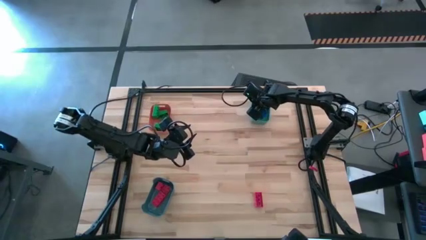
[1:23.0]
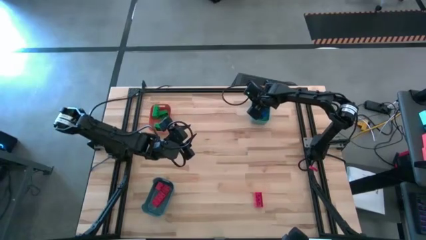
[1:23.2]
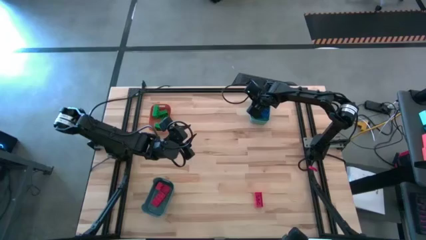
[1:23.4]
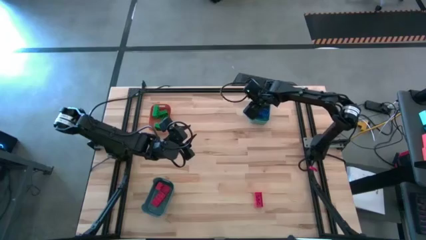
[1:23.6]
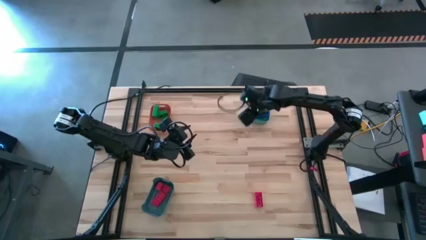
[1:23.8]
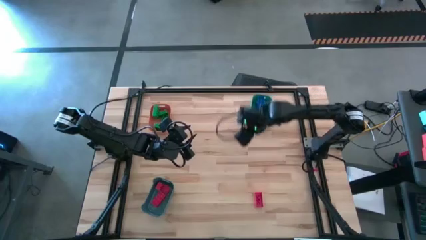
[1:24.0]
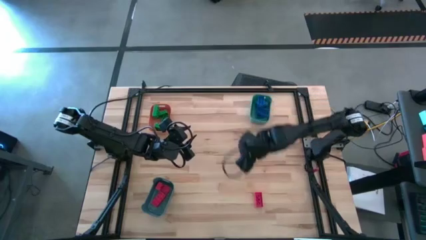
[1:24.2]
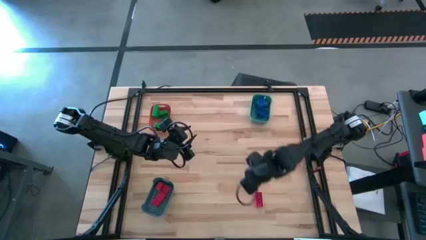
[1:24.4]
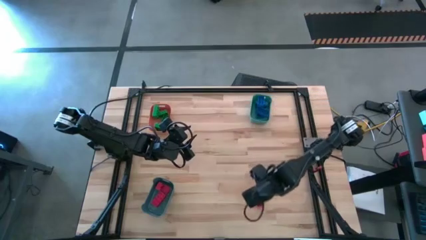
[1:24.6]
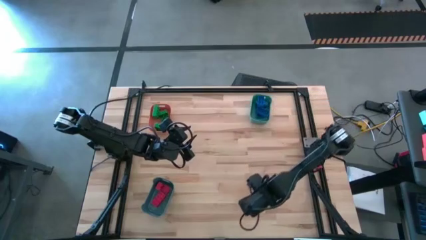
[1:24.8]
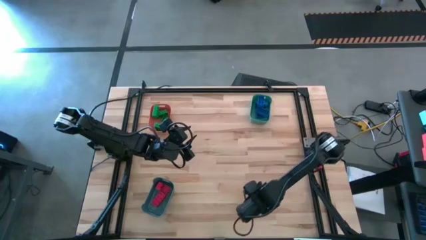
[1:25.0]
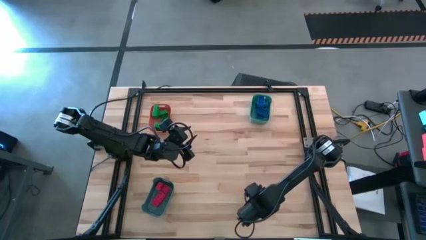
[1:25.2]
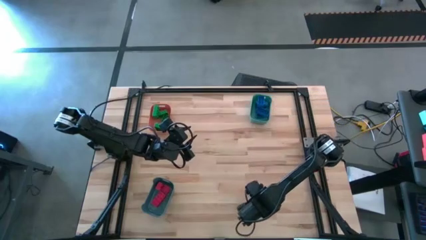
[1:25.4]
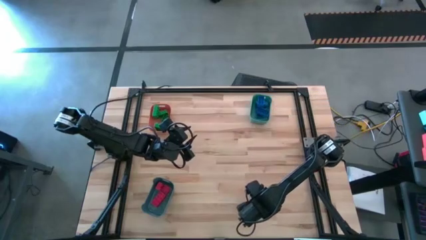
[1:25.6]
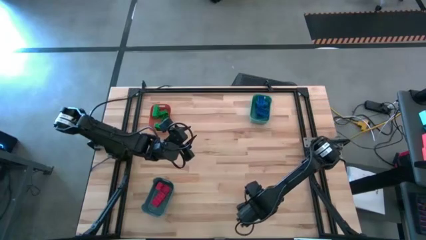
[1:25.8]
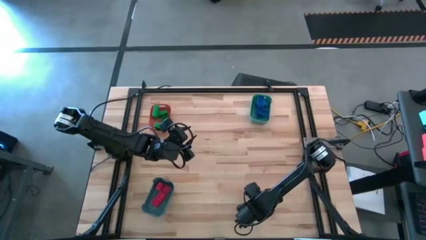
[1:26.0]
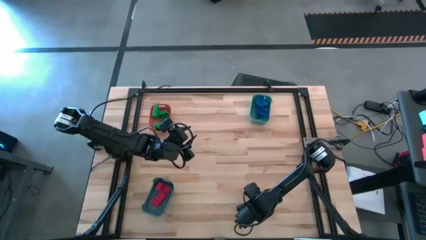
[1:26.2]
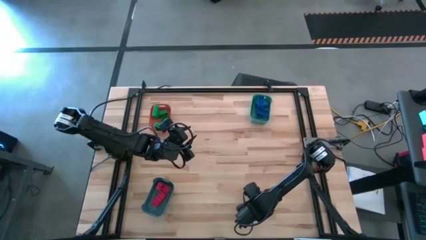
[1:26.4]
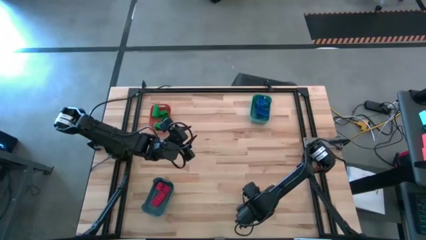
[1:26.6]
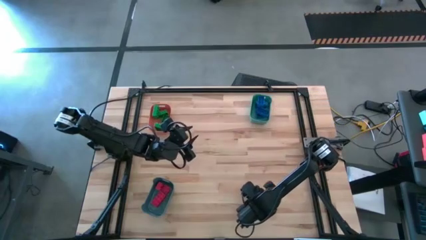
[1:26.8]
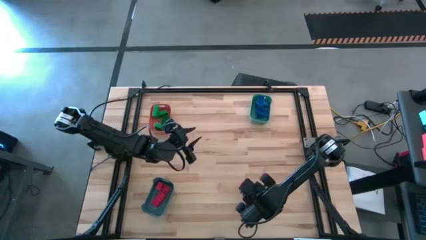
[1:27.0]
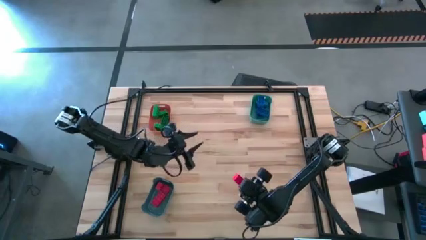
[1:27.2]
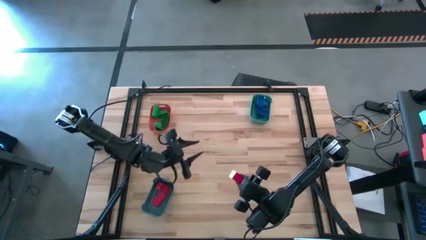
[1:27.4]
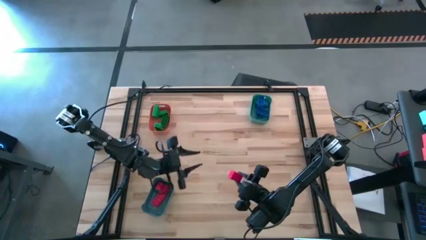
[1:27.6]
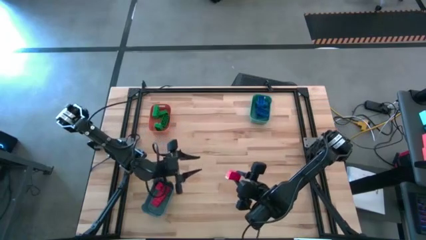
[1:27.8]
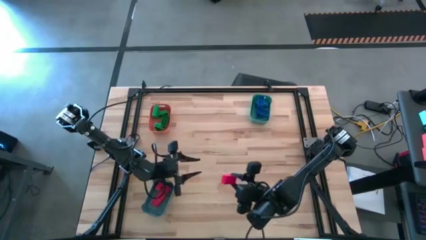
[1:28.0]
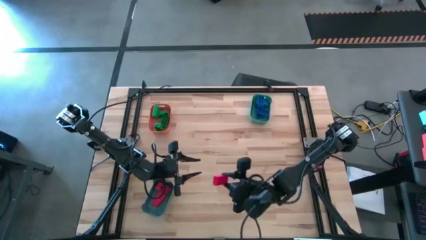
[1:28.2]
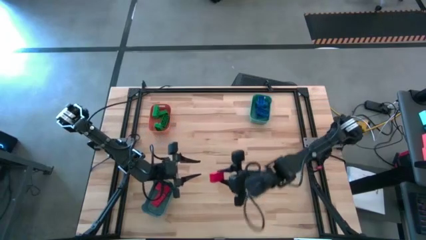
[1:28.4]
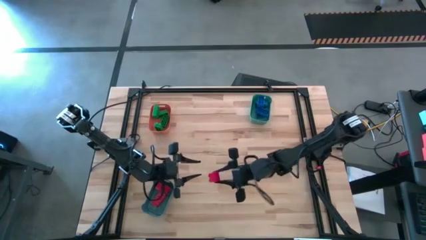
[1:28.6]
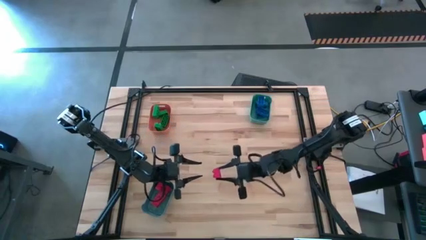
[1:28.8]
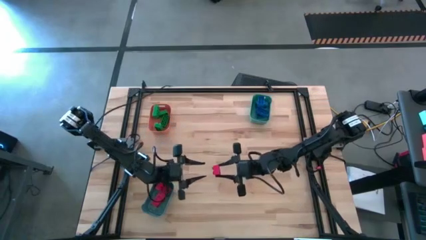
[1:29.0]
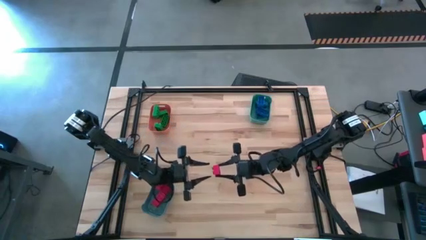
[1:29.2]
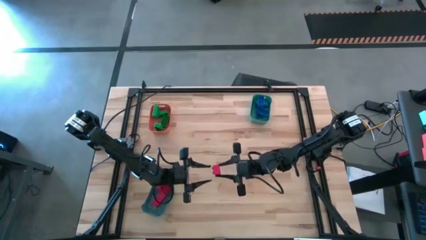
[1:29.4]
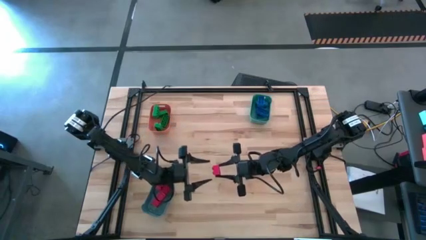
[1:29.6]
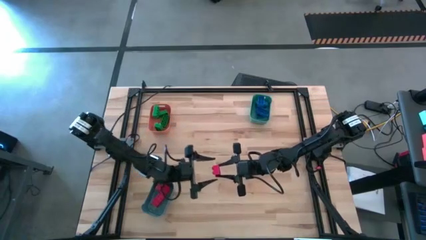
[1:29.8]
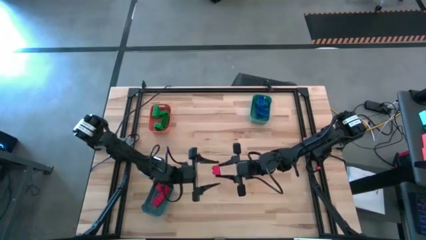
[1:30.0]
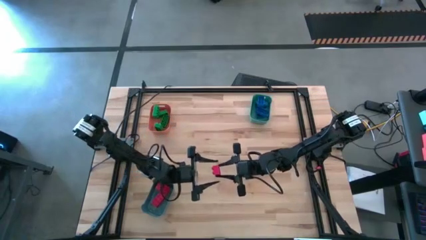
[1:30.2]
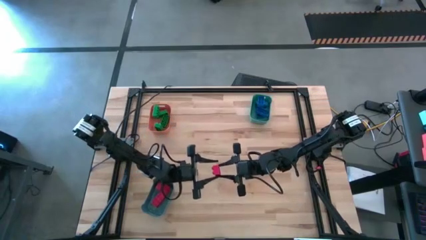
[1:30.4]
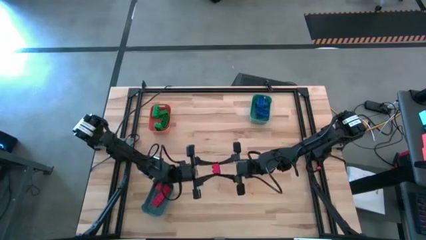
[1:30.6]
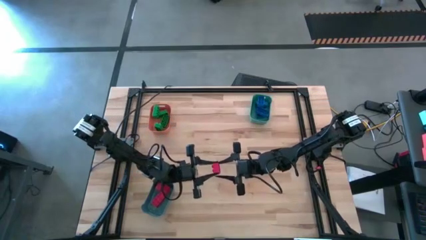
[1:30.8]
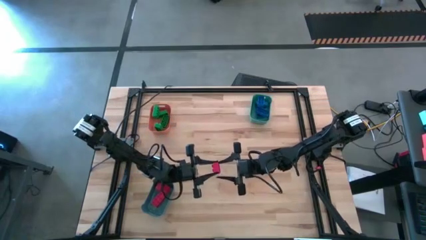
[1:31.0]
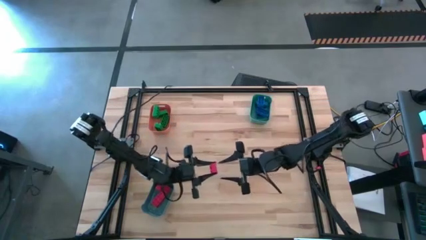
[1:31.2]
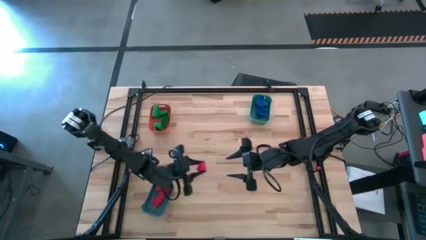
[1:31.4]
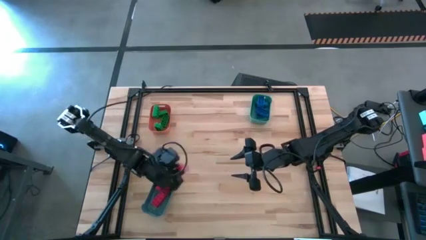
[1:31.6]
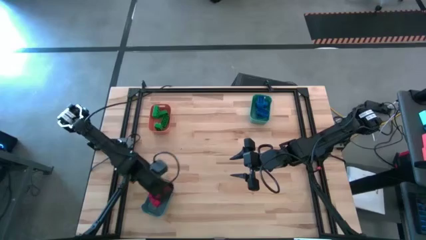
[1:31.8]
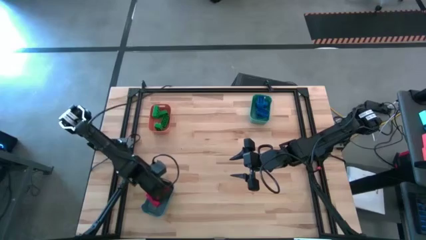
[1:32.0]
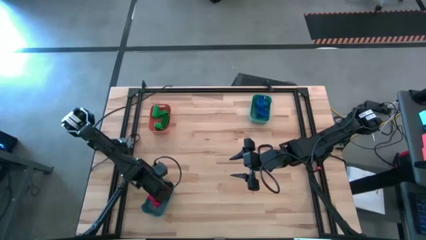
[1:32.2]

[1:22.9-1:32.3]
Task: Sort & place blocks by color
Put the red game piece into the blue bin

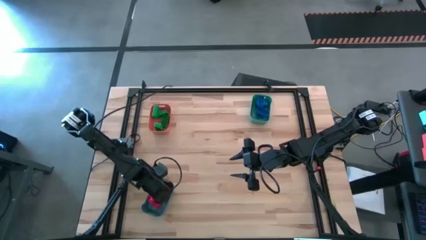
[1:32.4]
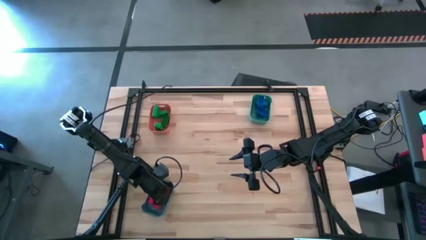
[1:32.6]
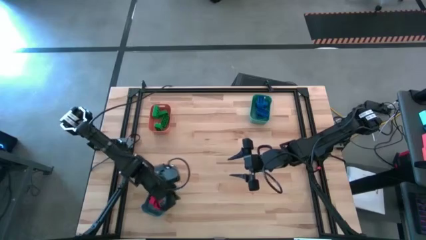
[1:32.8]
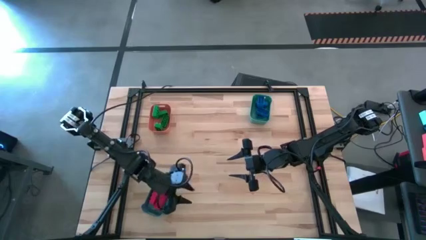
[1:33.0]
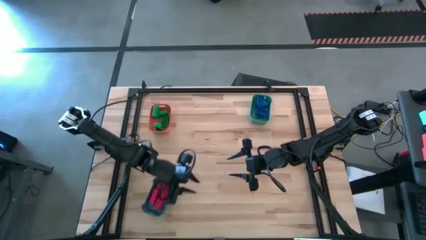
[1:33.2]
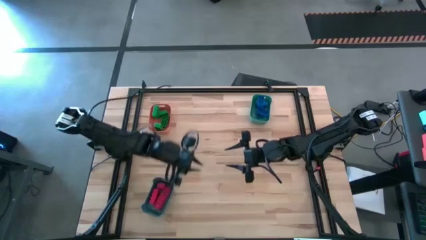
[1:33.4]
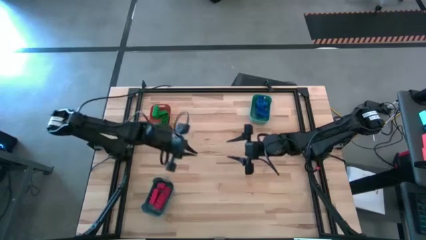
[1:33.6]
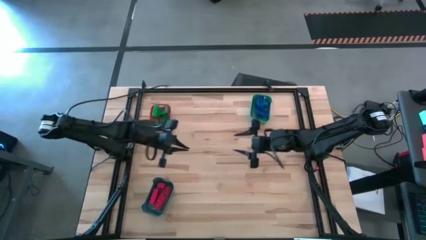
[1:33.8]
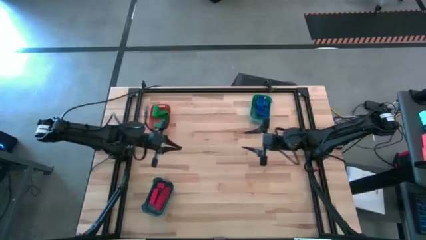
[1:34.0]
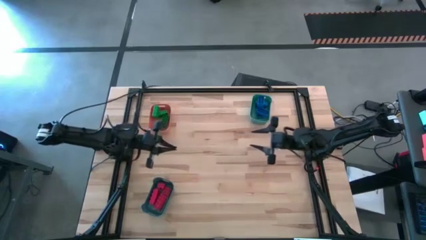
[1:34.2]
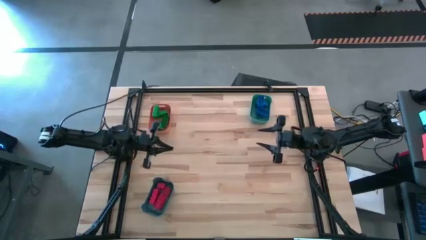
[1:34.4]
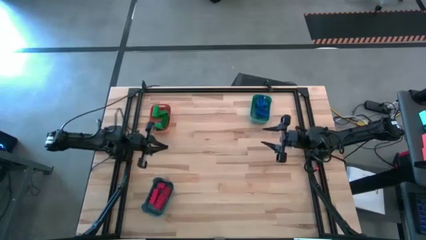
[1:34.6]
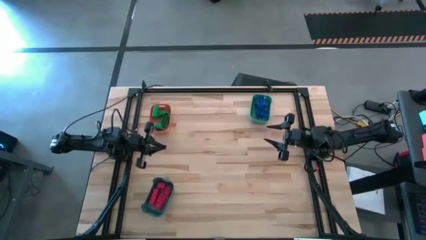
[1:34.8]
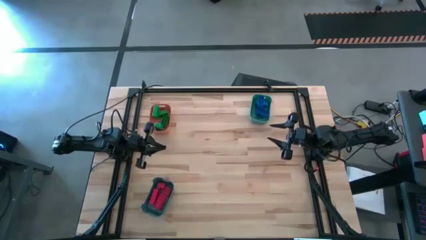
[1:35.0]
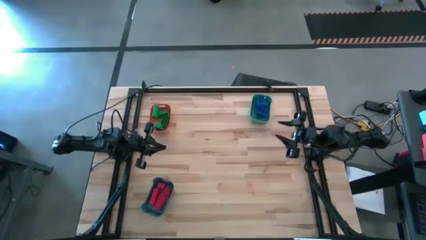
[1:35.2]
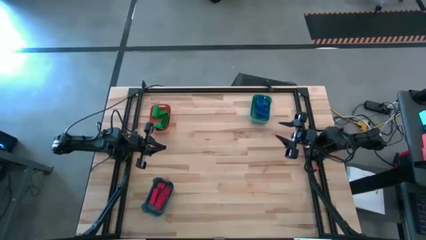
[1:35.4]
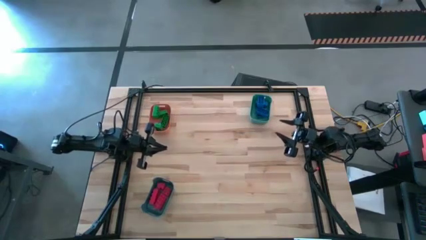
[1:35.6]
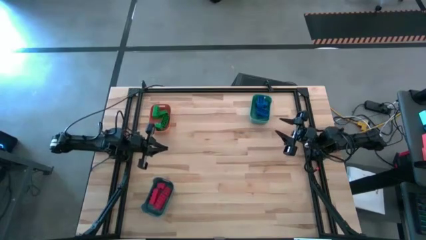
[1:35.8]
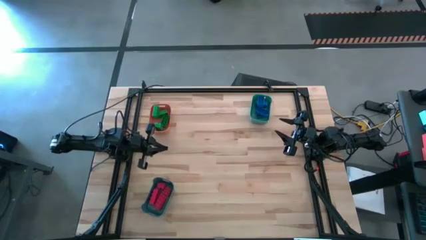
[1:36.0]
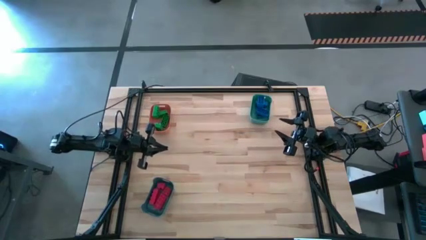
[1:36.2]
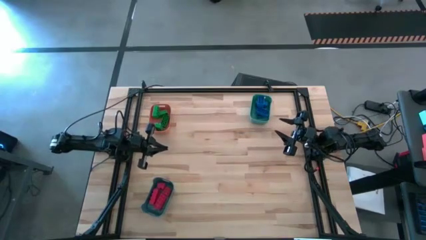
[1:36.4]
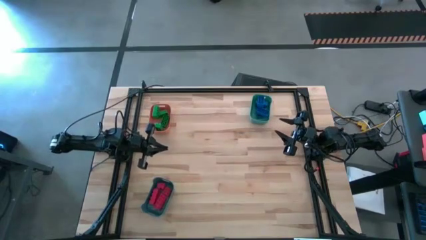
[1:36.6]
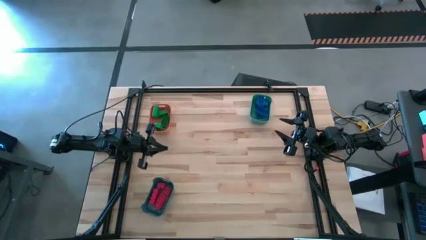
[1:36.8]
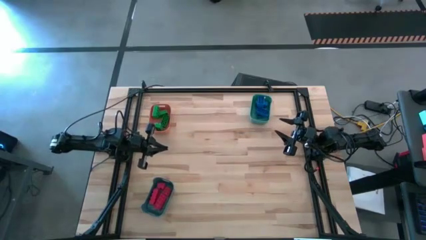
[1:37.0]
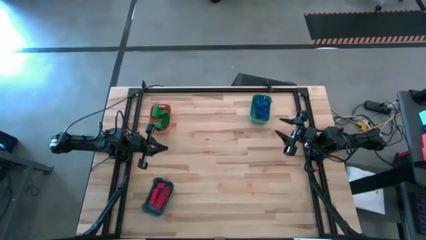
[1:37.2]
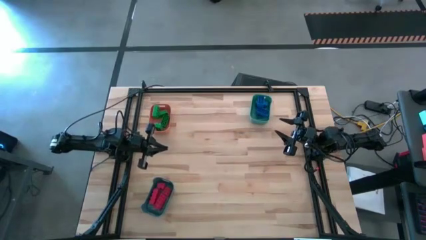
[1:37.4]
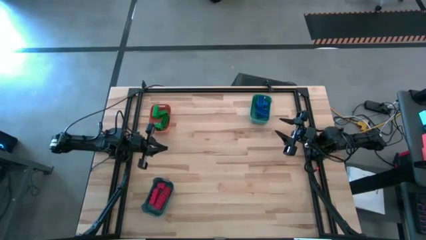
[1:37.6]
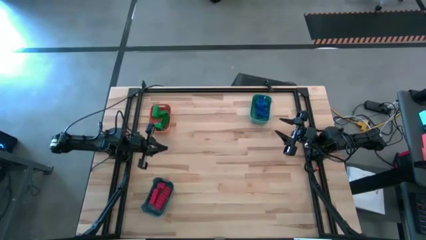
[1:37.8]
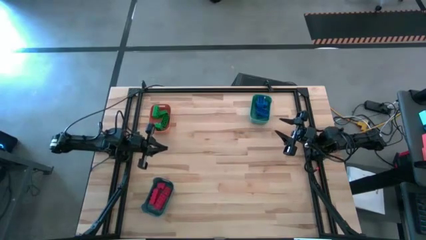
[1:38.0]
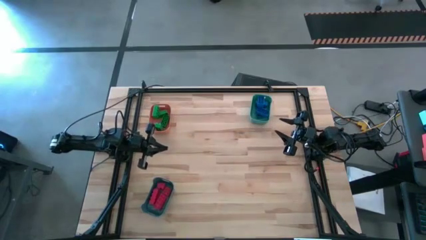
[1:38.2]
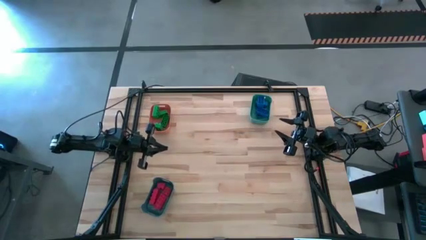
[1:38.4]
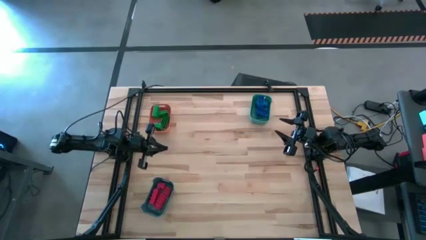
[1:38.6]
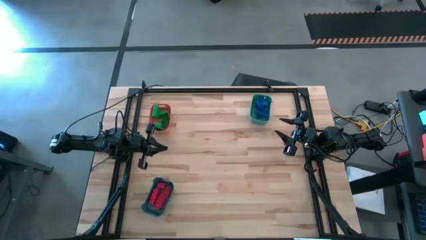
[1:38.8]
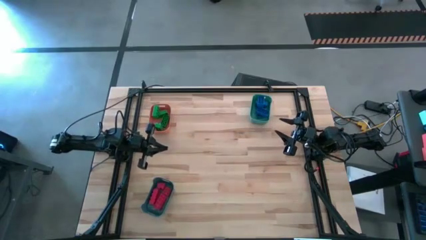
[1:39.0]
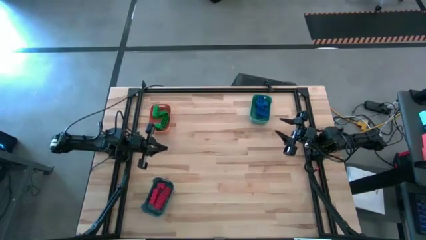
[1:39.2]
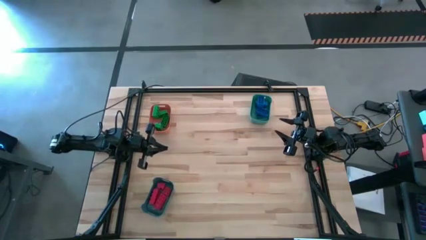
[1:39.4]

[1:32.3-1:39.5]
Return to Home Position
